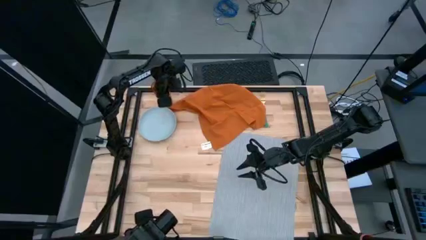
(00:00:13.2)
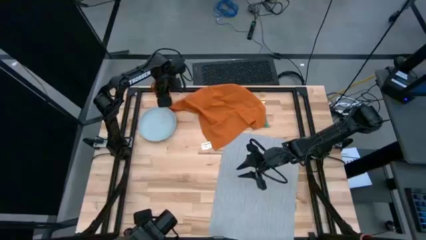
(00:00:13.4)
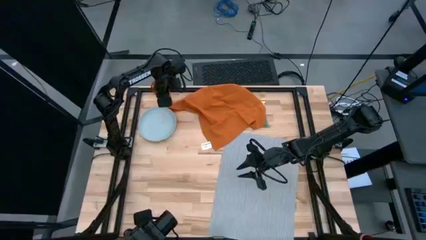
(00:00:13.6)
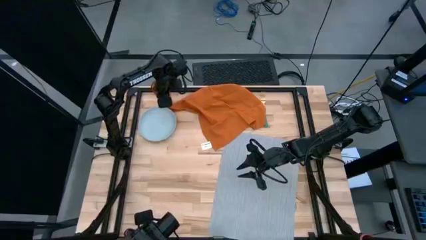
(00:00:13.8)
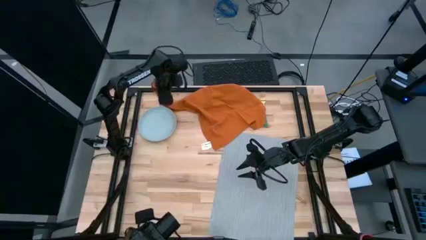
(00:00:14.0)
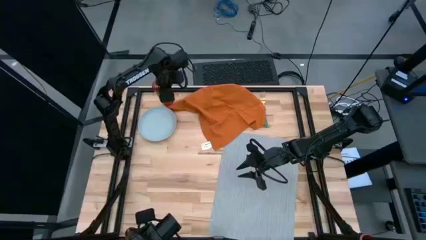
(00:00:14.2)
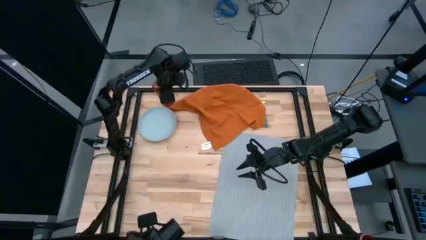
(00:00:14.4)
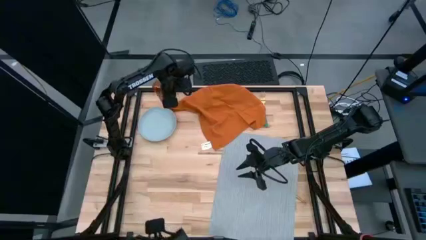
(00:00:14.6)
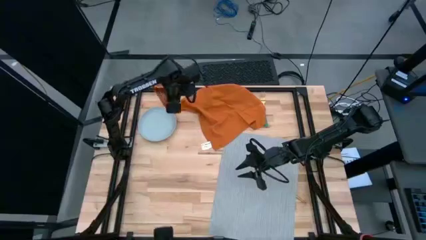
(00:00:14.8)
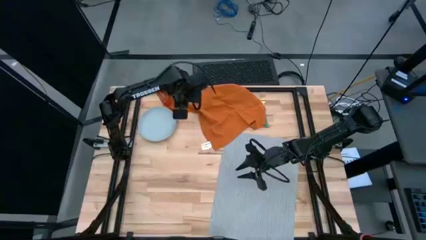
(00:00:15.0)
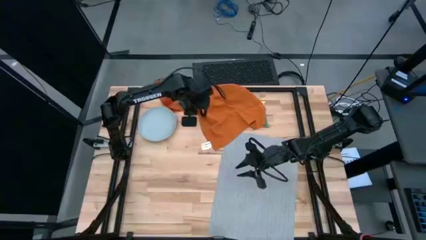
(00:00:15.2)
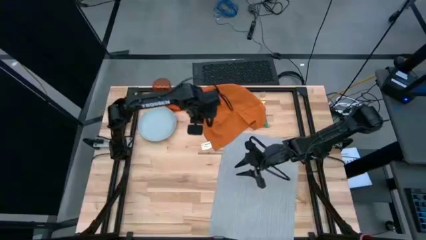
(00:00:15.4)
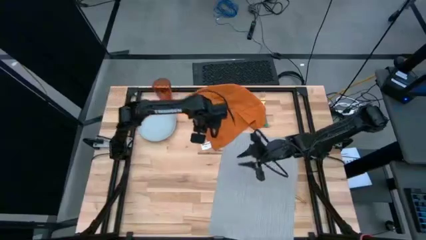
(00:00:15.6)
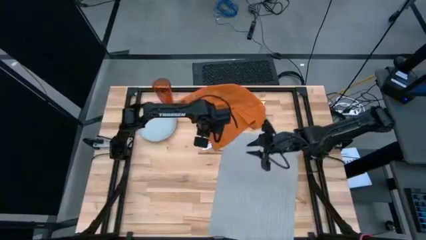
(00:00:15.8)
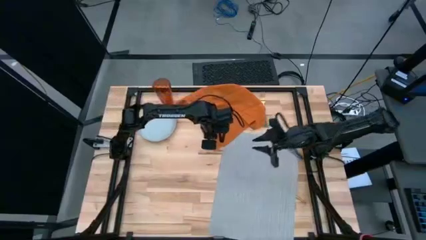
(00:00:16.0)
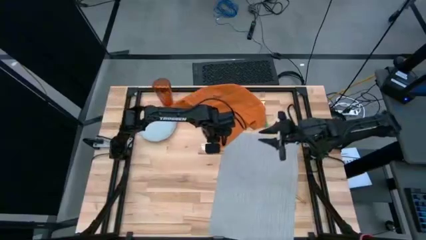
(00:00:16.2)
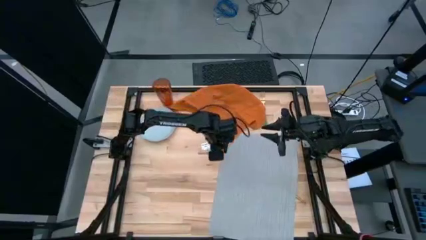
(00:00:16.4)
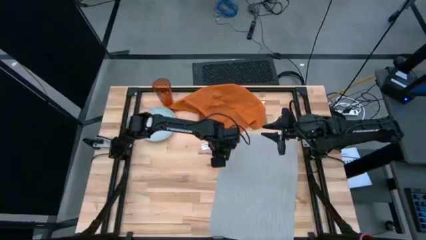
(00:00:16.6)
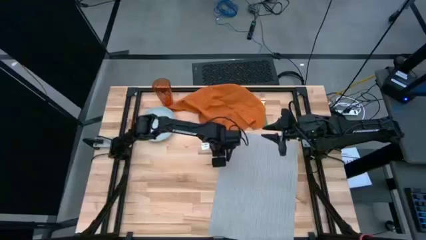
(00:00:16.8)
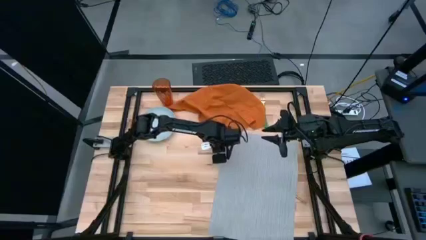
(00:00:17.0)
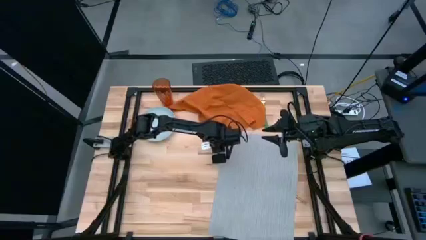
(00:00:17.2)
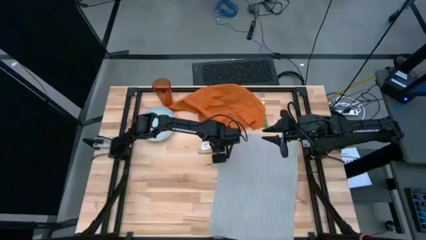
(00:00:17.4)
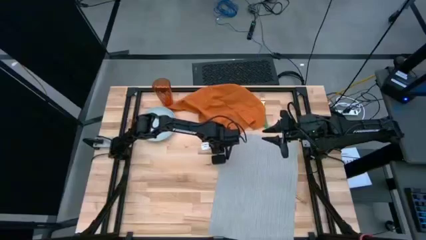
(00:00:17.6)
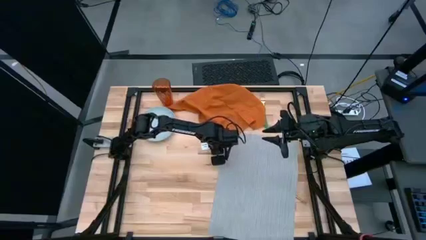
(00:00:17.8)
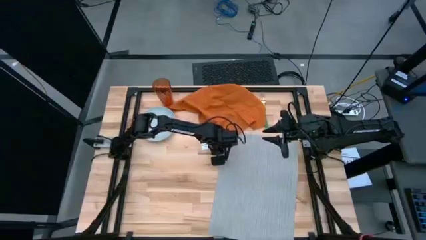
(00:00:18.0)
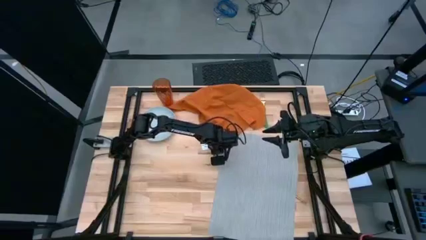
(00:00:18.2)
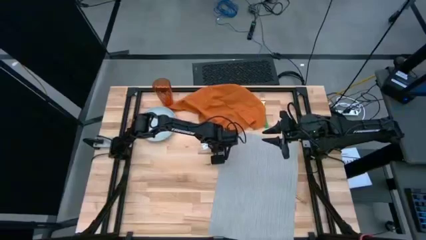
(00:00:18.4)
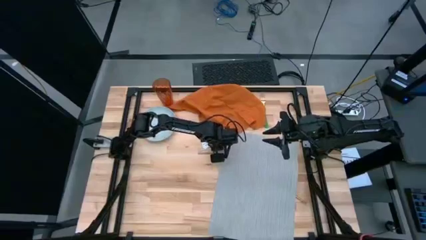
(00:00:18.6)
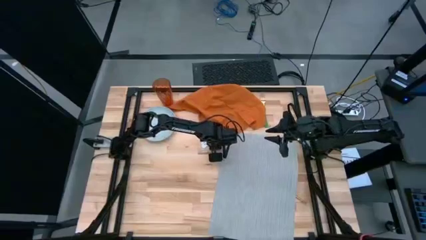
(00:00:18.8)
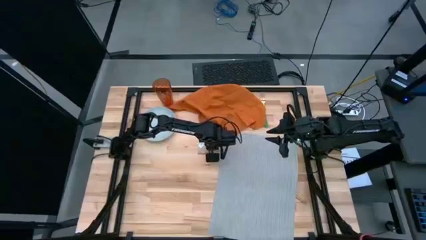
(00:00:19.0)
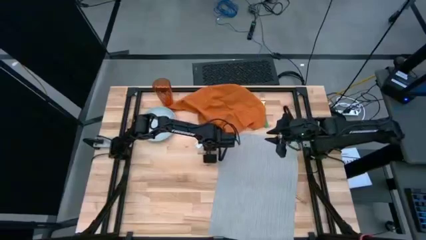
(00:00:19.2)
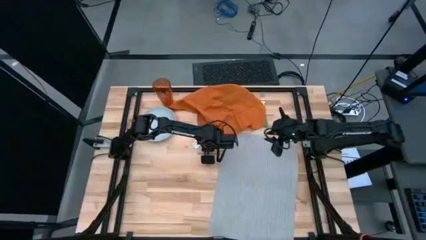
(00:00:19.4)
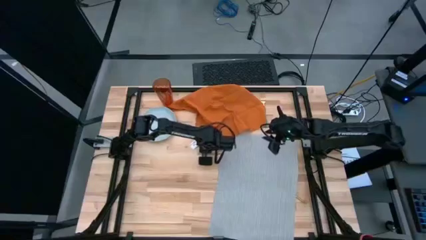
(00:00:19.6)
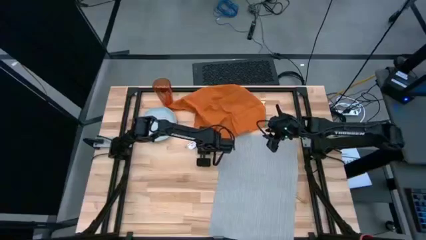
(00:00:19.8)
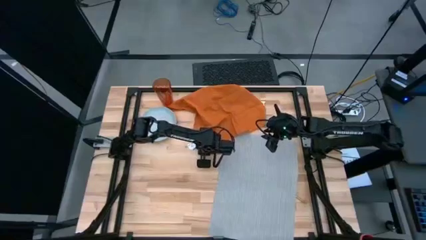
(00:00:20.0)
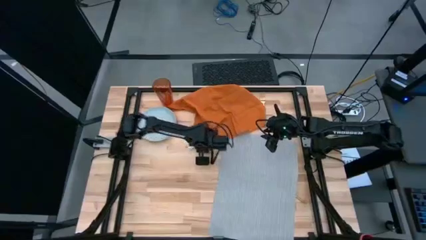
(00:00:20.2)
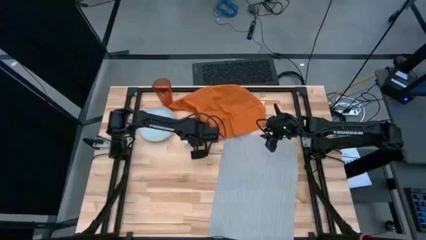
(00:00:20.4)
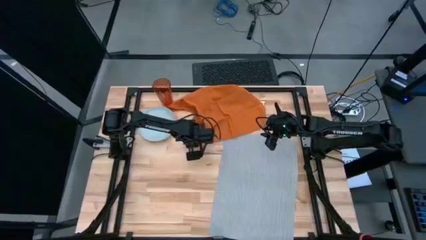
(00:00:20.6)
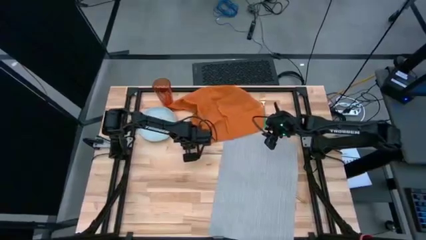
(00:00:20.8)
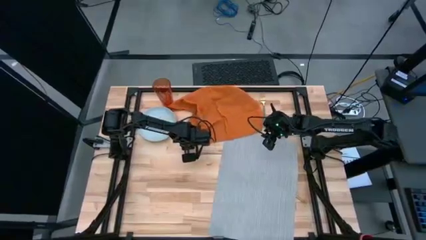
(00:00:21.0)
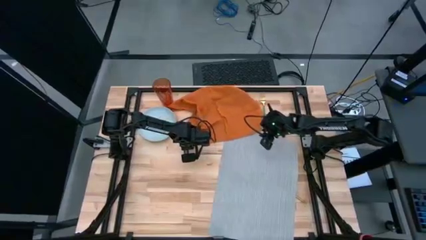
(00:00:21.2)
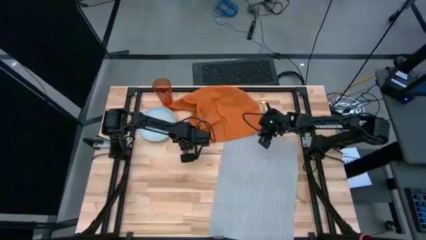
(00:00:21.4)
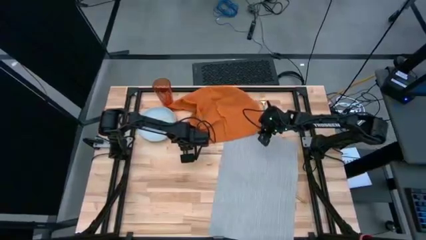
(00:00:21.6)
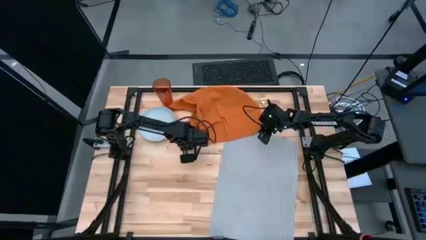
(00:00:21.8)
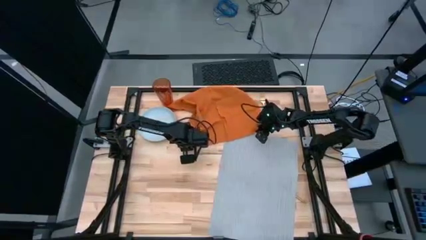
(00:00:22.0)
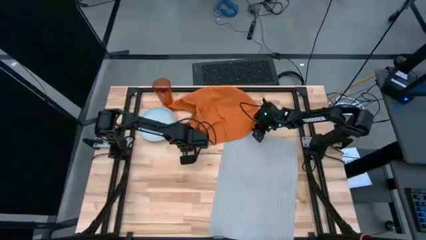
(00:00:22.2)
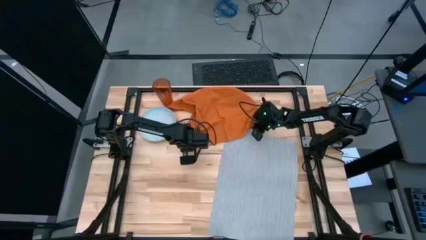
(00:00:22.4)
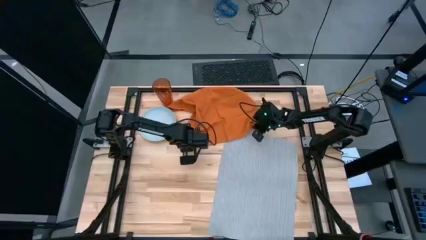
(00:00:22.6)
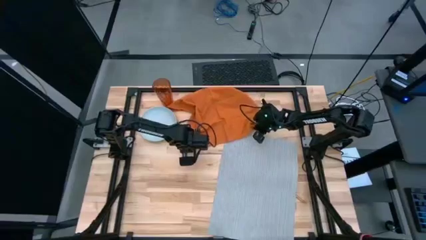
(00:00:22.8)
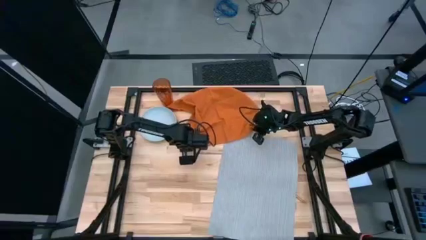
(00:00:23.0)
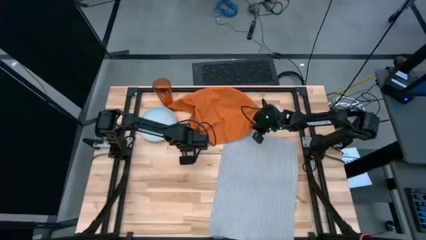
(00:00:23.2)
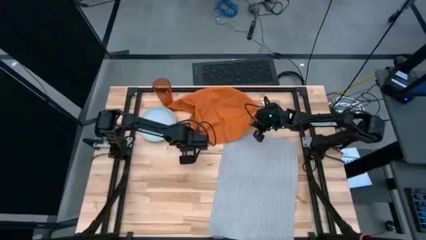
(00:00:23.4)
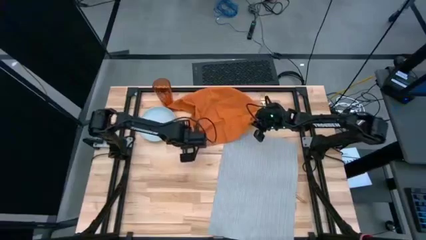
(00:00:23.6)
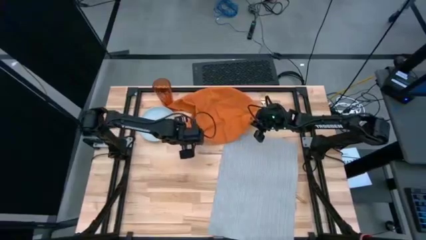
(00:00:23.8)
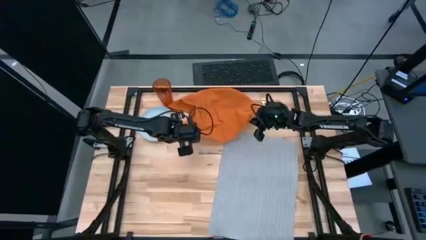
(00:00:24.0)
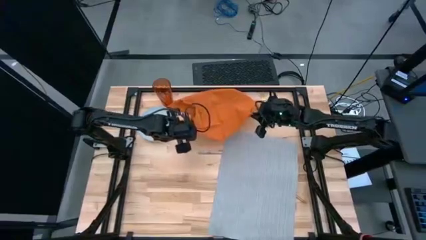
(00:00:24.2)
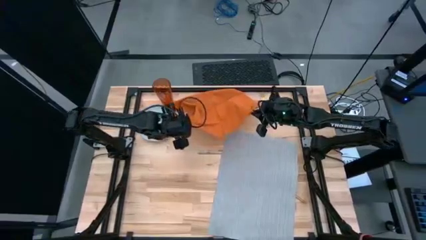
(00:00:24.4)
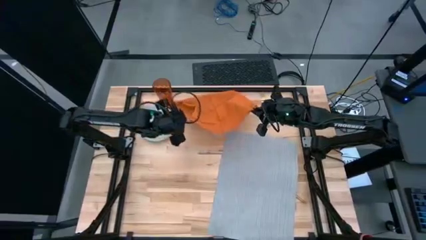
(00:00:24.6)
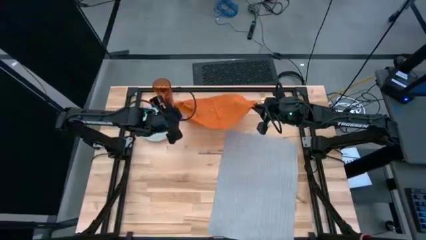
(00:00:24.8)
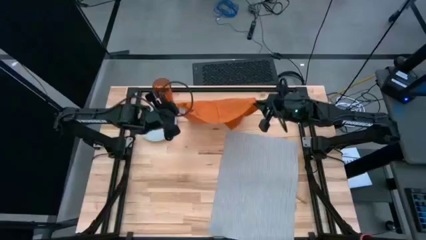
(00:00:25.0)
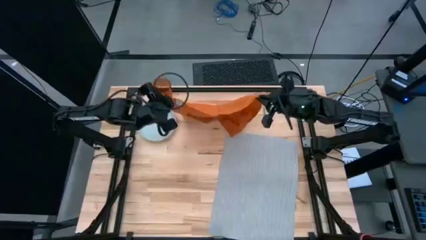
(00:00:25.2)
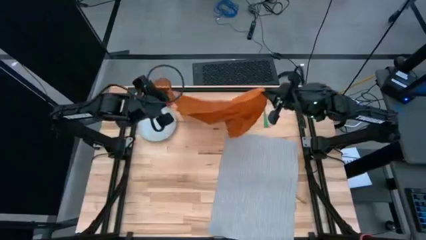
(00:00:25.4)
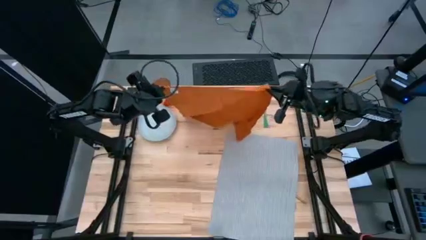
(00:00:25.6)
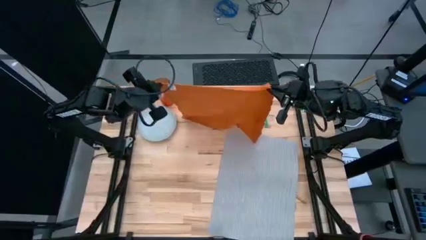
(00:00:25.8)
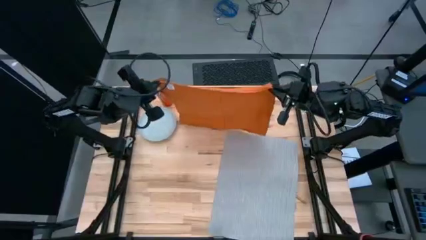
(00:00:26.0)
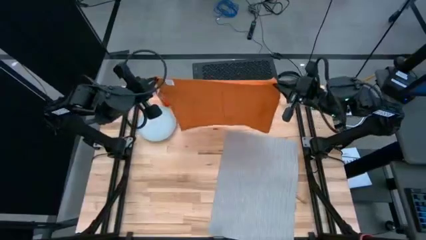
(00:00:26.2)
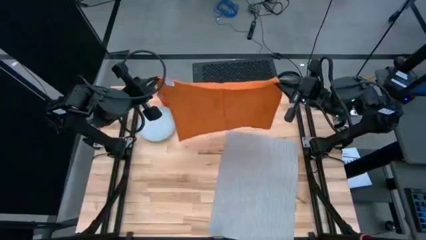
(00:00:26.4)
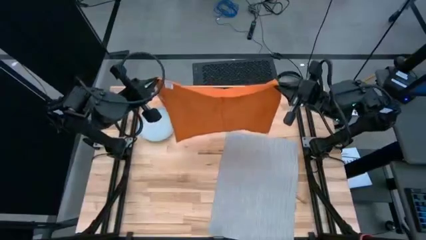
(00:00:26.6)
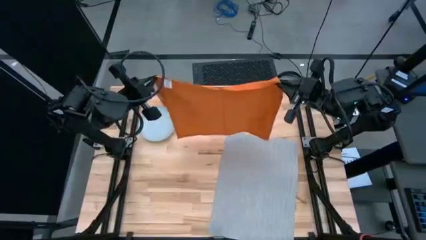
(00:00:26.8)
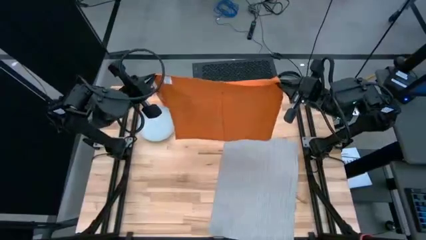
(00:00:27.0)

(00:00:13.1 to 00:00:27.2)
Task: Set table place
Fold the orange napkin

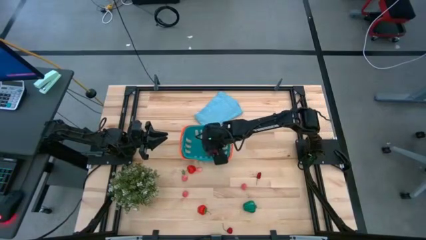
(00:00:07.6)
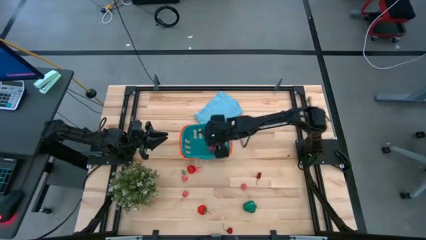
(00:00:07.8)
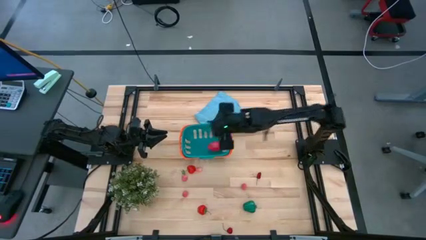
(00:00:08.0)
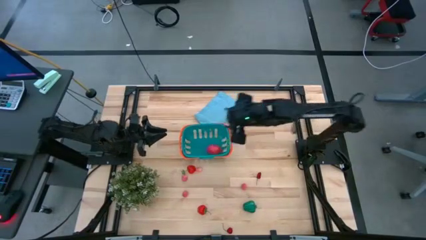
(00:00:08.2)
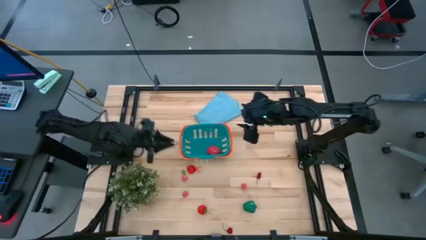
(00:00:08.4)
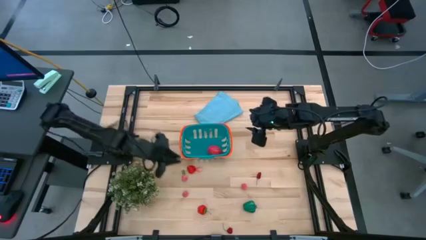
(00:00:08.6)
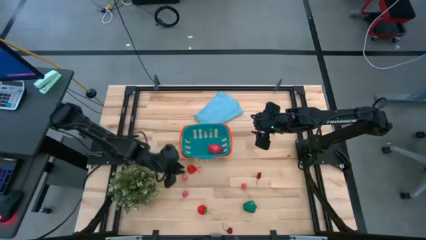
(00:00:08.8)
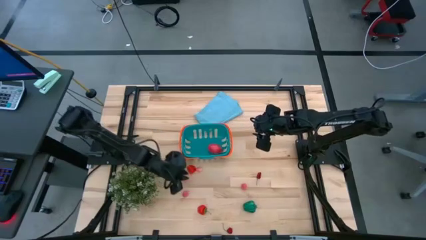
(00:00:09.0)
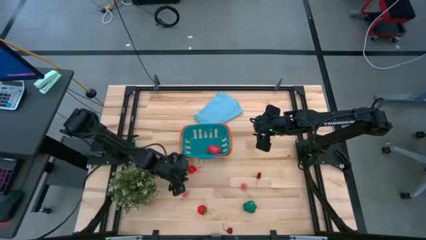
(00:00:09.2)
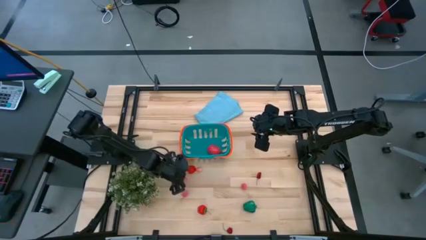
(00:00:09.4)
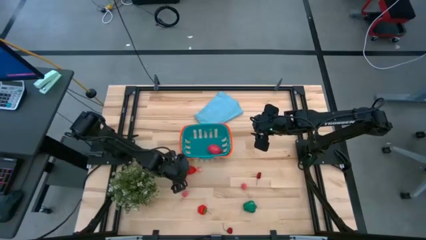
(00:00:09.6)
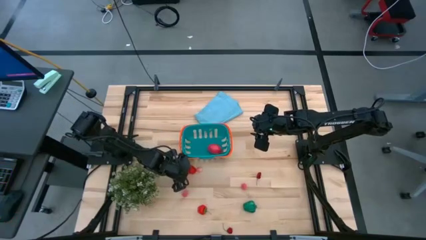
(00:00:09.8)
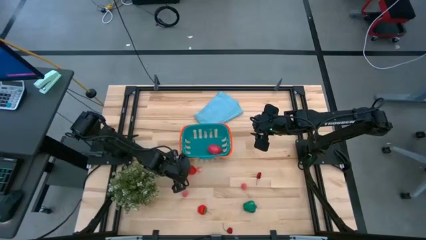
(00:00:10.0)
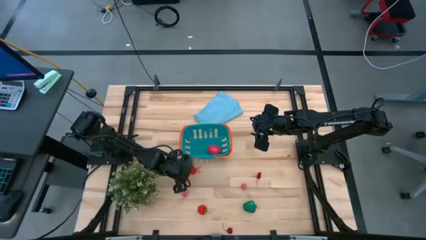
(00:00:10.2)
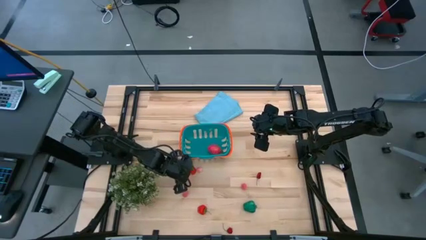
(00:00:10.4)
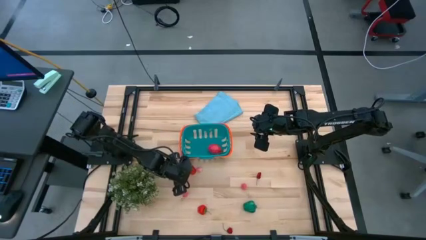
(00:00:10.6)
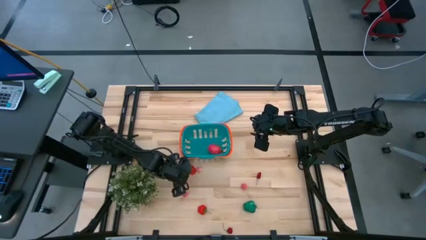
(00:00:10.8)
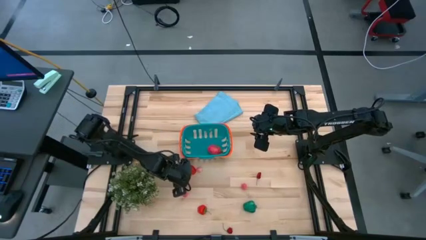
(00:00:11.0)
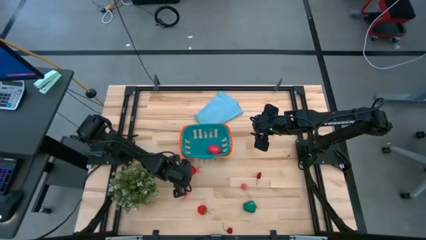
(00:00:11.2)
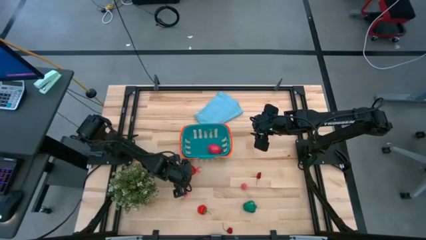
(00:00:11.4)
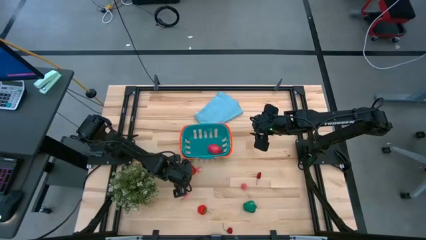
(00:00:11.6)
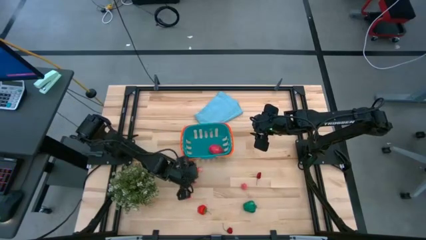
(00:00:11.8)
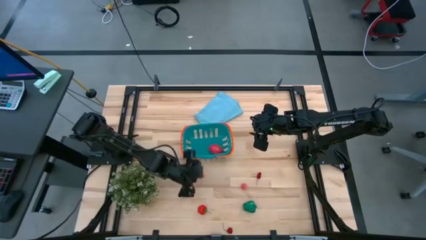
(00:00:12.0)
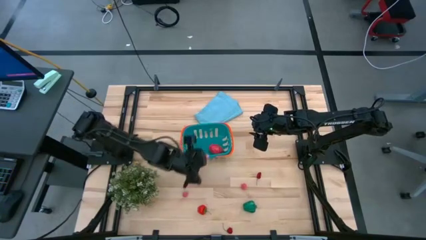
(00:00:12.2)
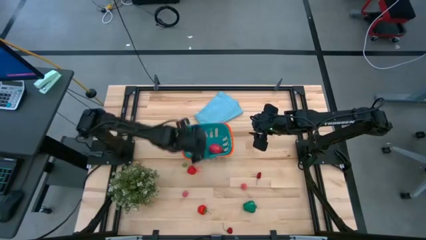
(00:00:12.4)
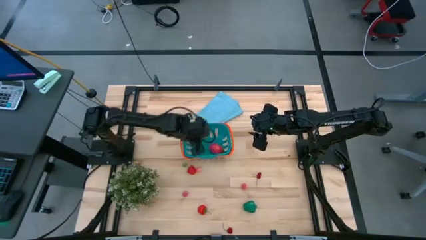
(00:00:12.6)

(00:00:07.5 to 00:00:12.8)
Task: Pick and placing Produce into tupperware
Put the pink peach into the bin
